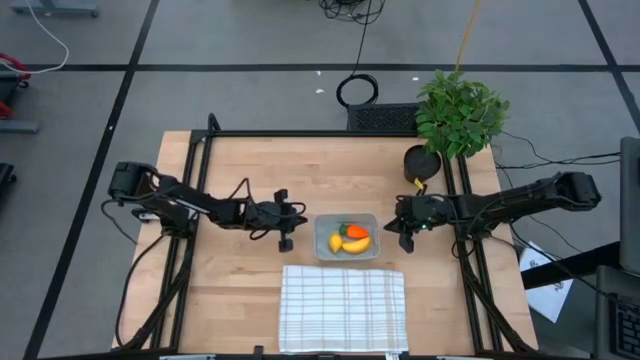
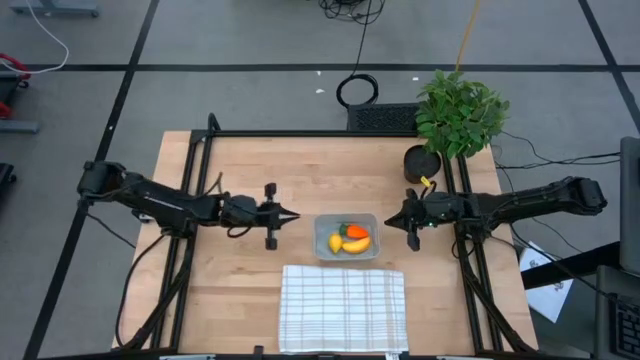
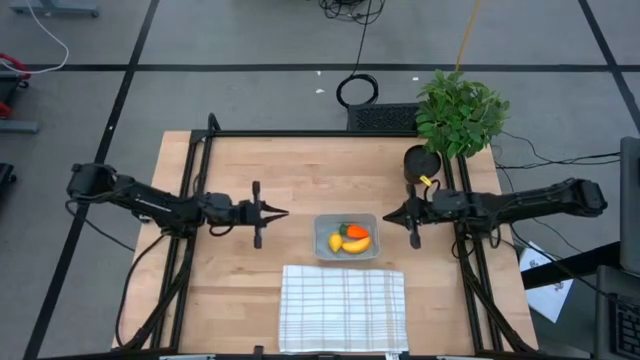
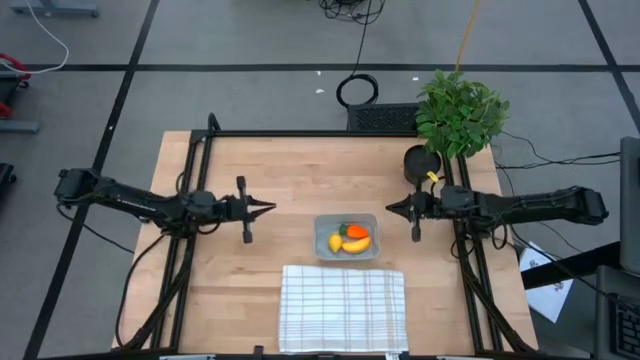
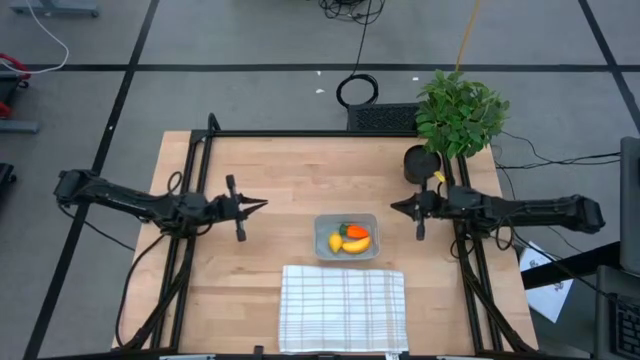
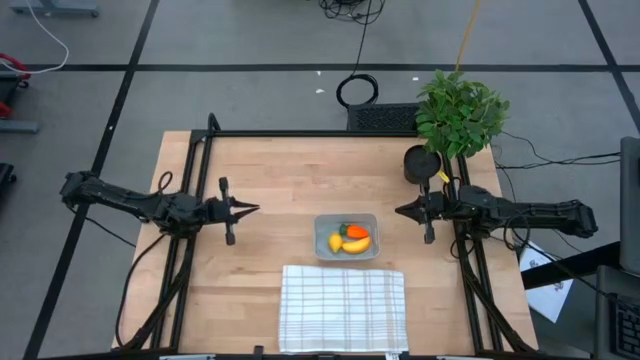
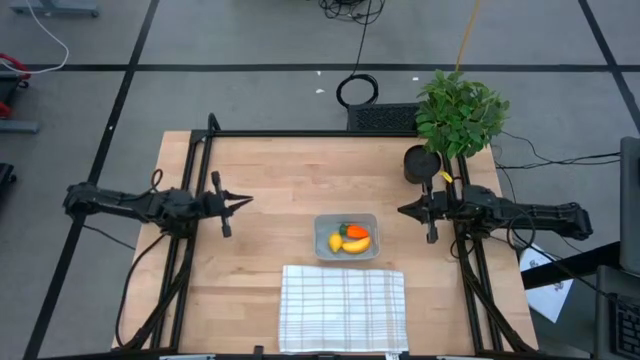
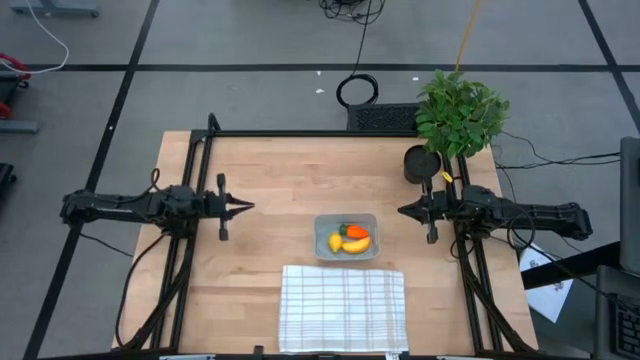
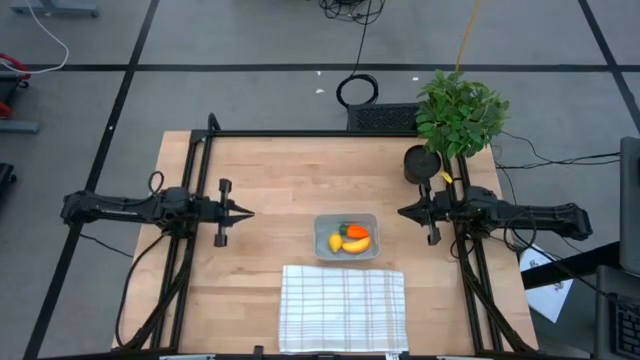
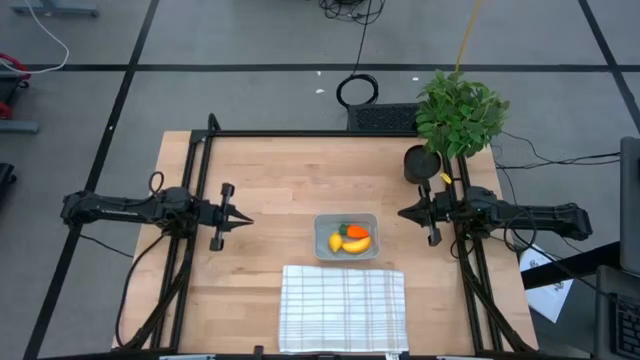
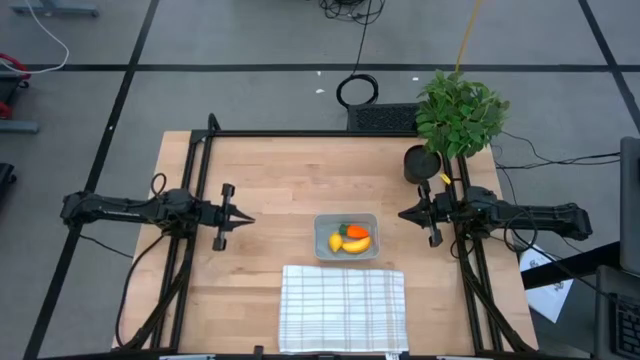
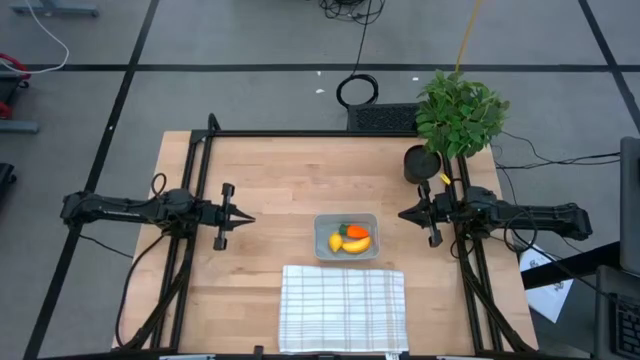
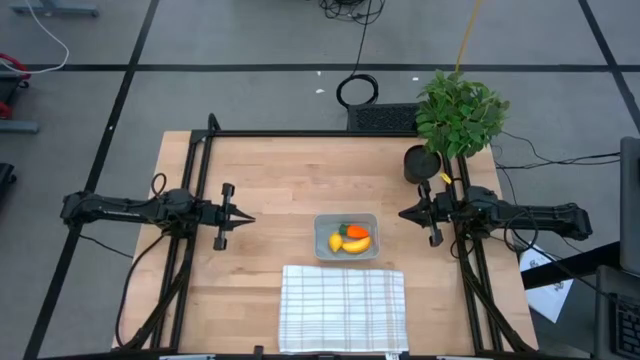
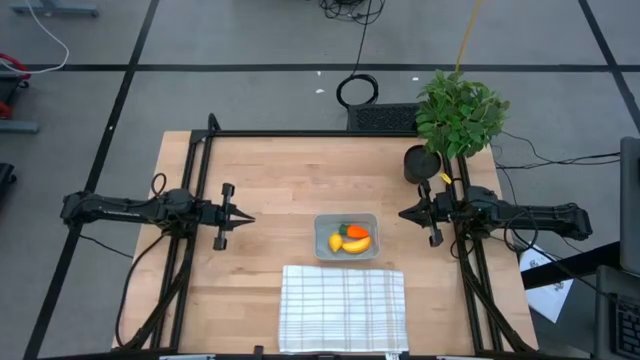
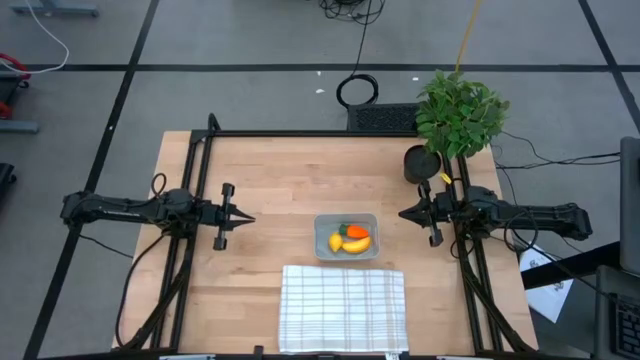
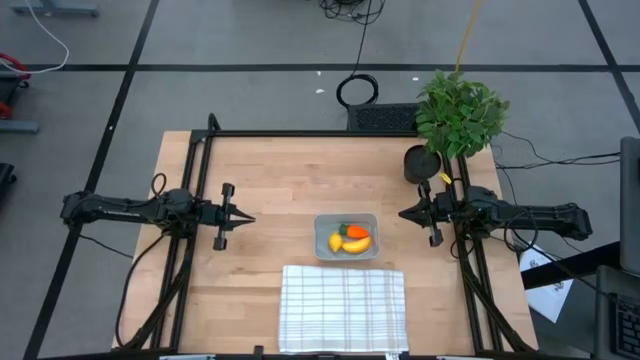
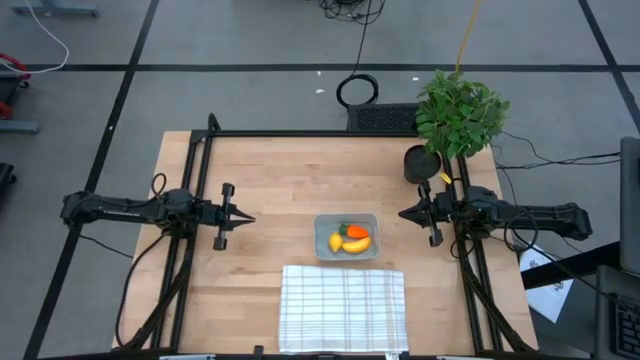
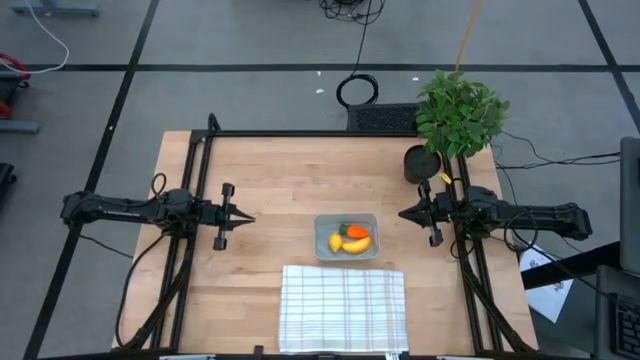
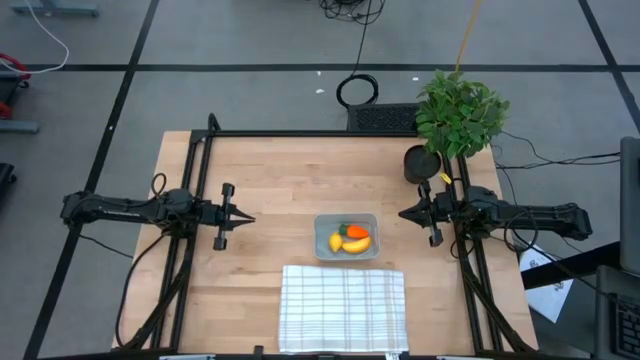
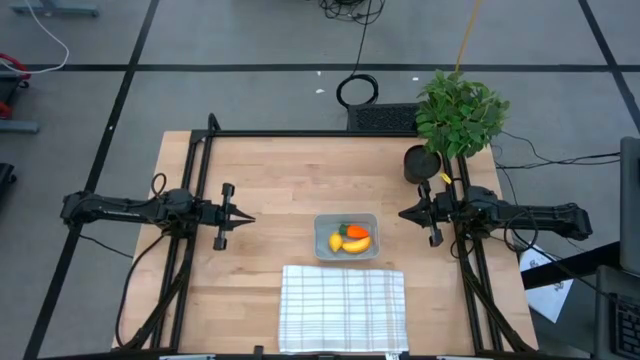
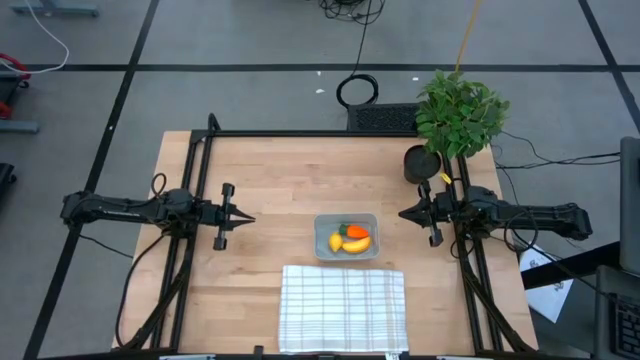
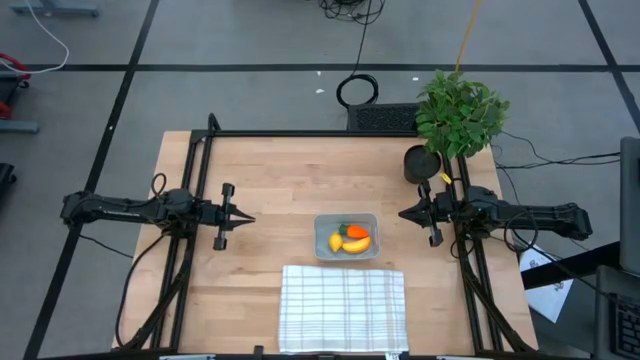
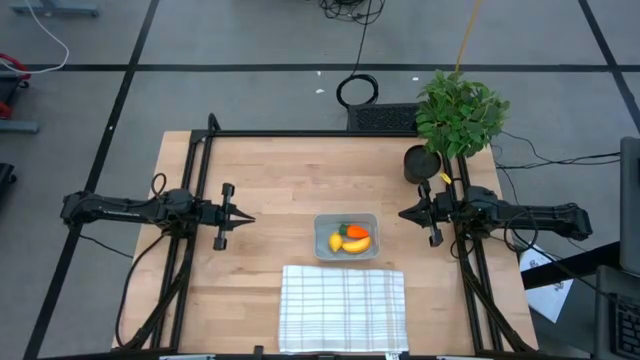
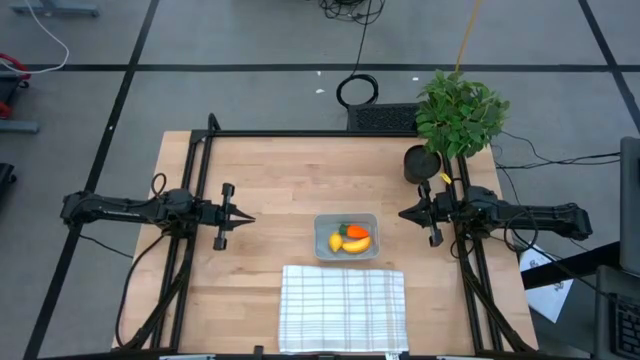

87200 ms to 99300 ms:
Task: Pick and placing Produce into tupperware
Return to Home Position

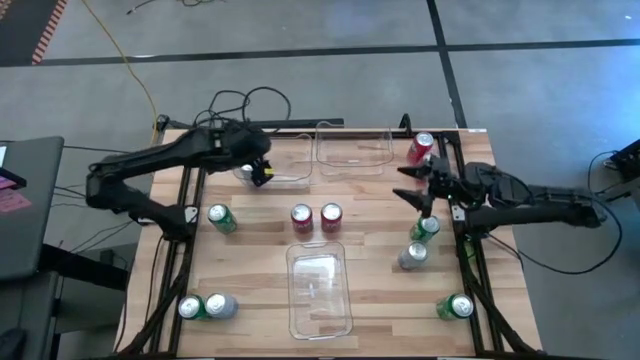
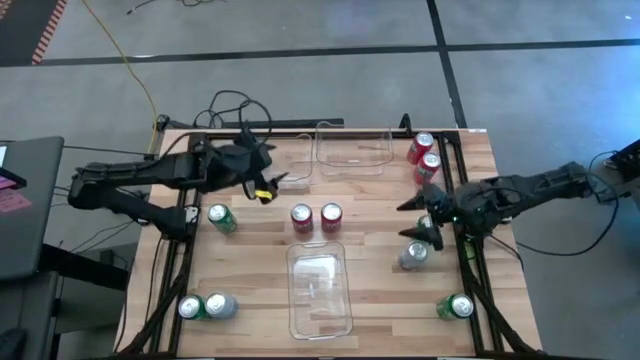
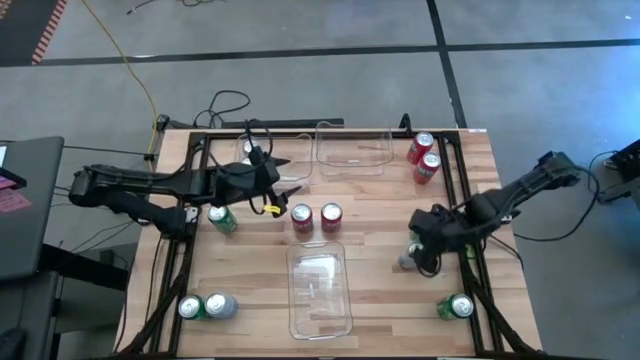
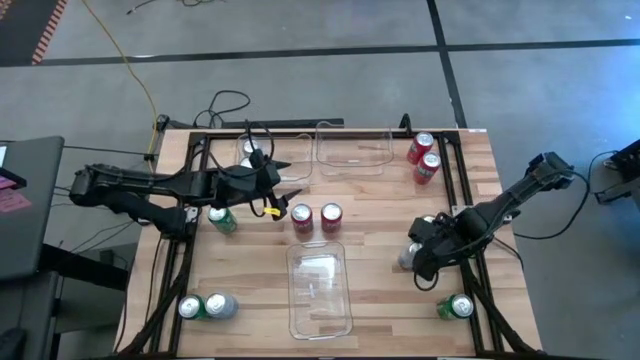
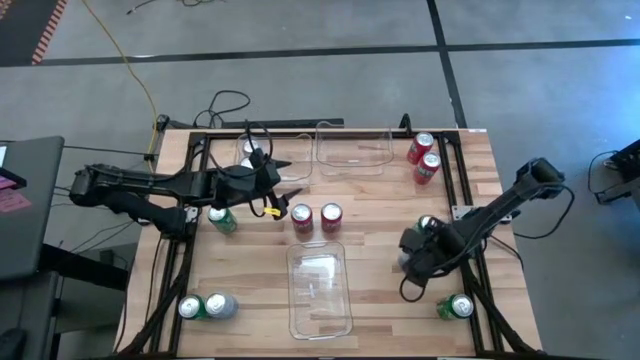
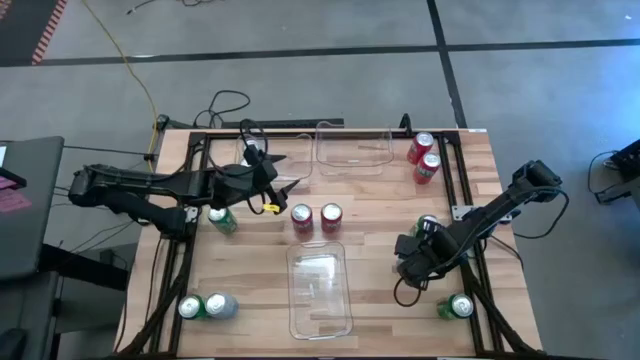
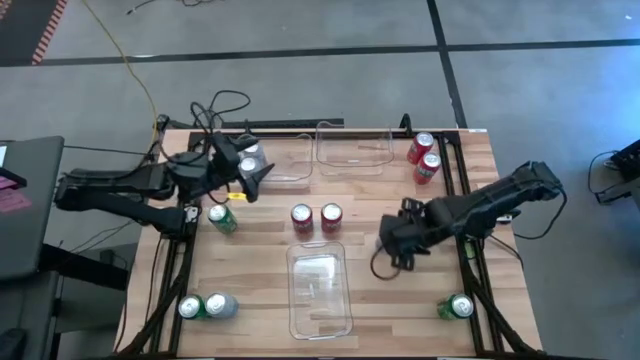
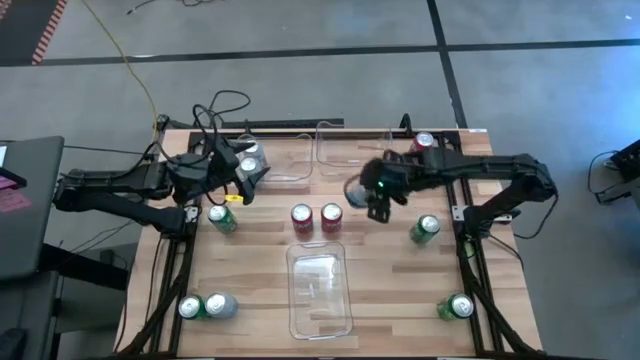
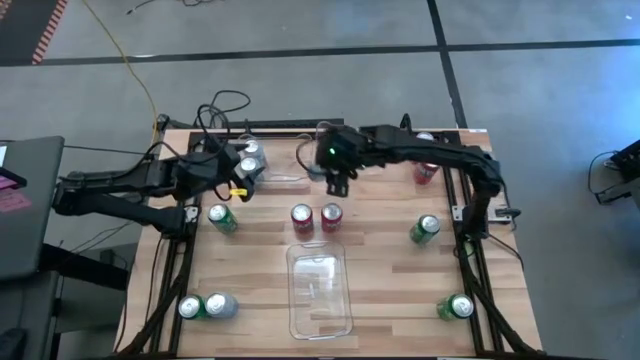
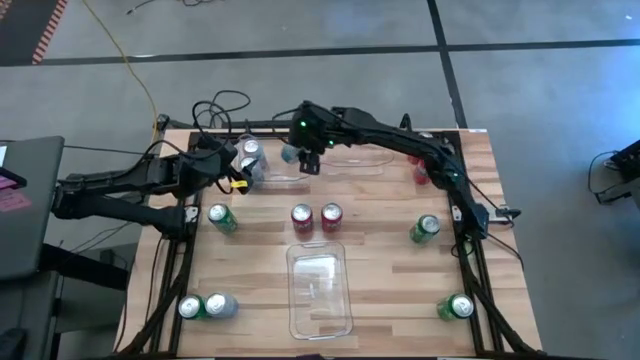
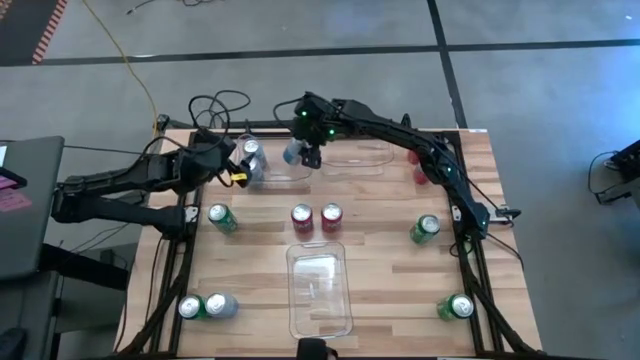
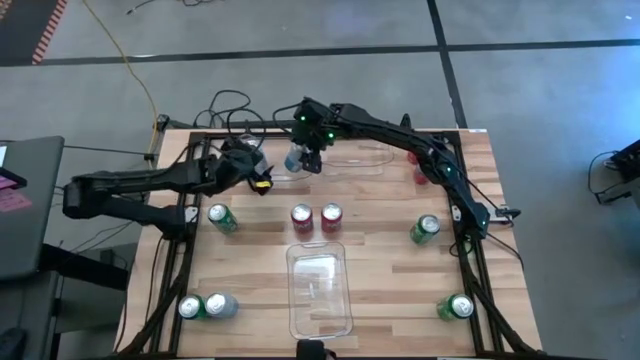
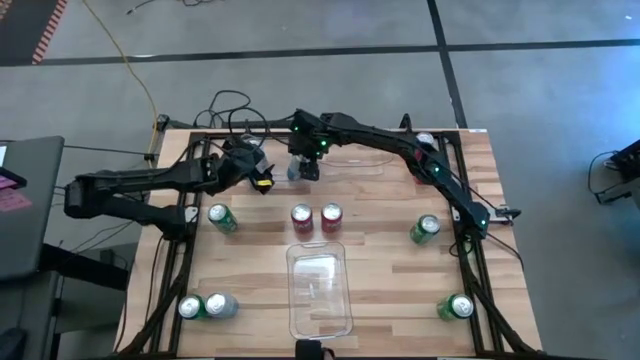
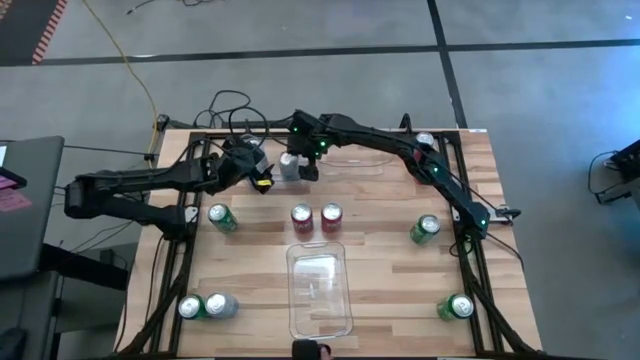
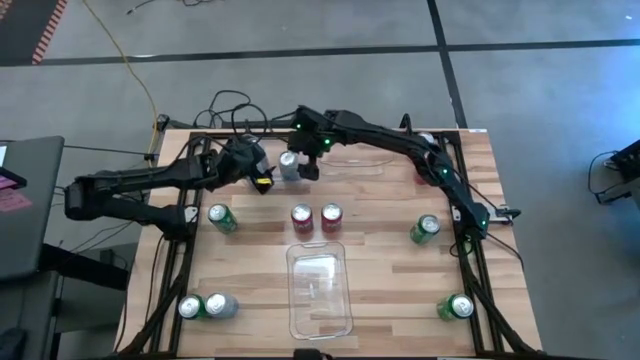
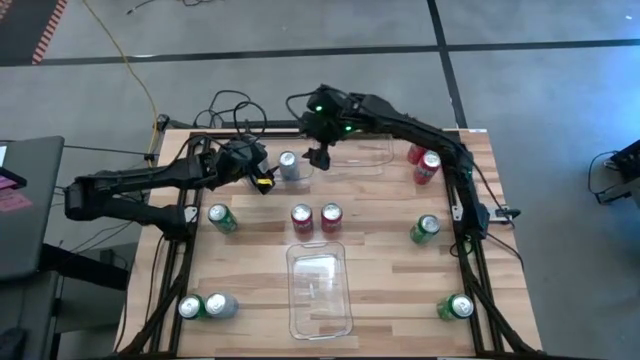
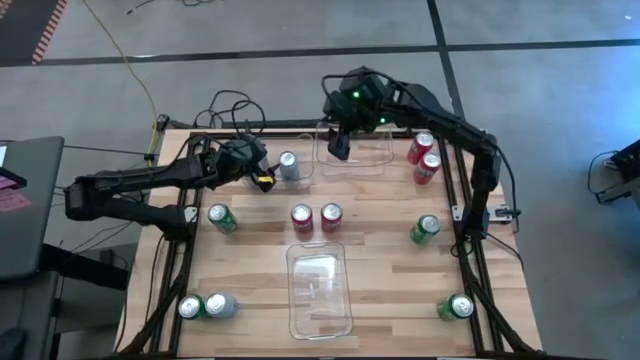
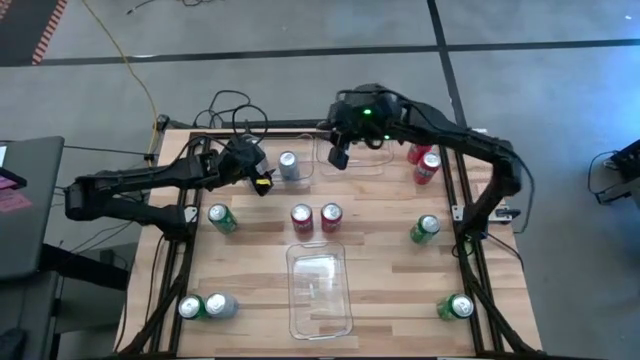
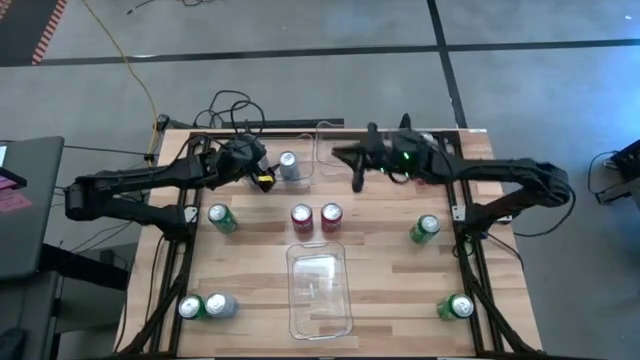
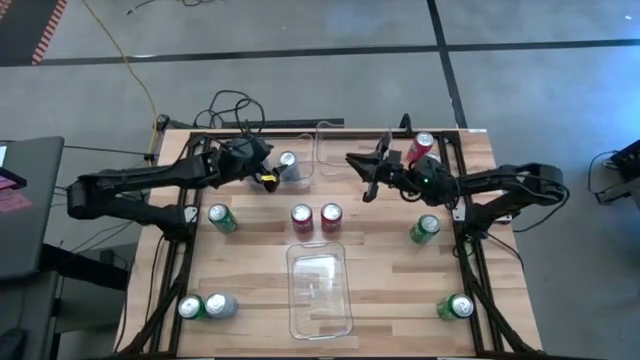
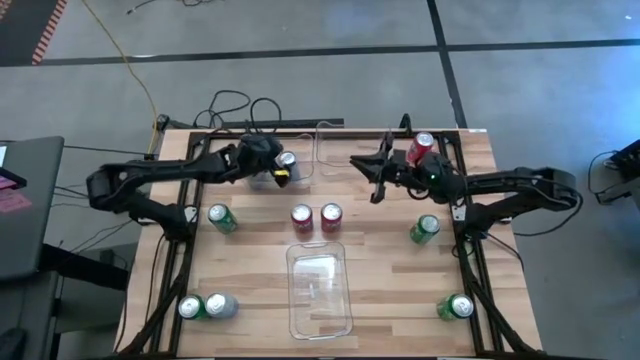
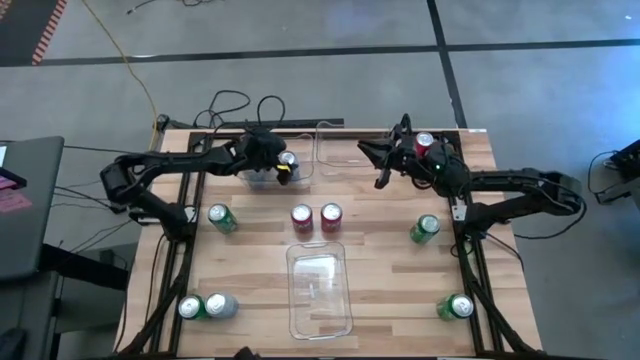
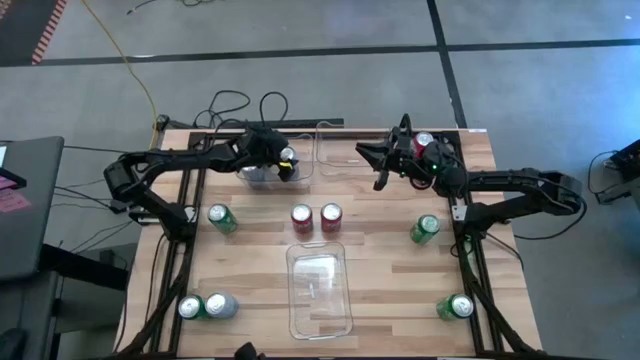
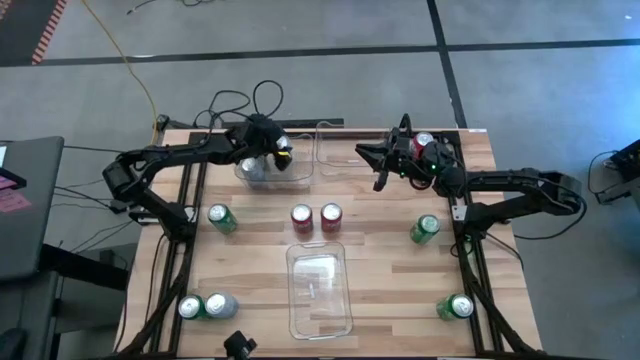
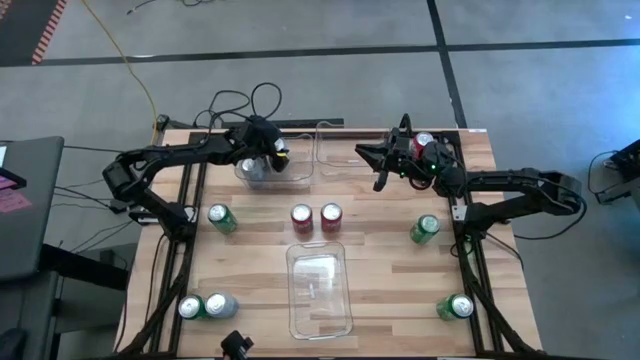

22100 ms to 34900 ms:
Task: Sort soda cans
Put the right white and blue soda can into the top left transparent bin
